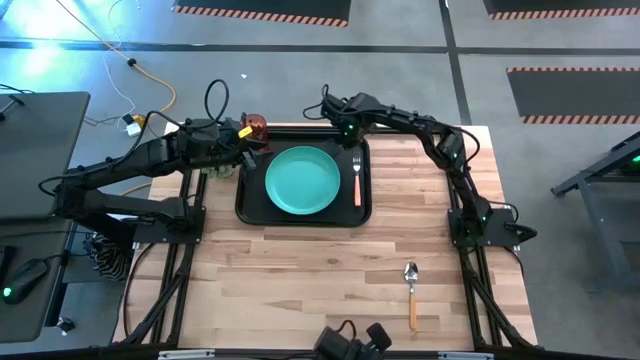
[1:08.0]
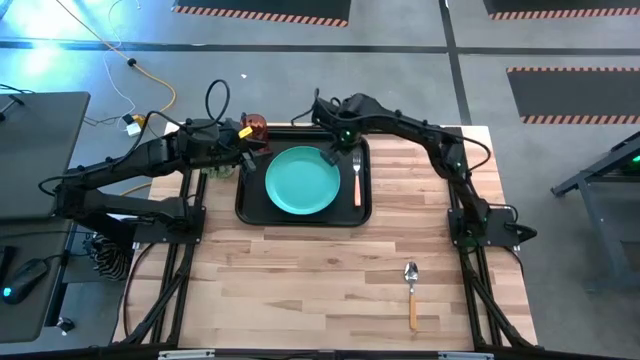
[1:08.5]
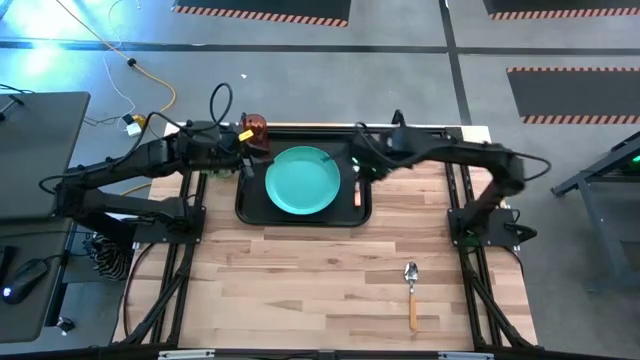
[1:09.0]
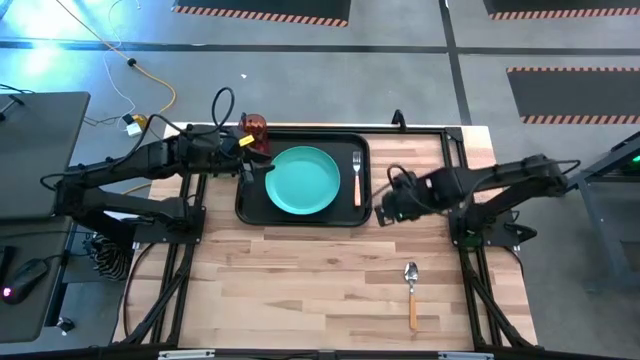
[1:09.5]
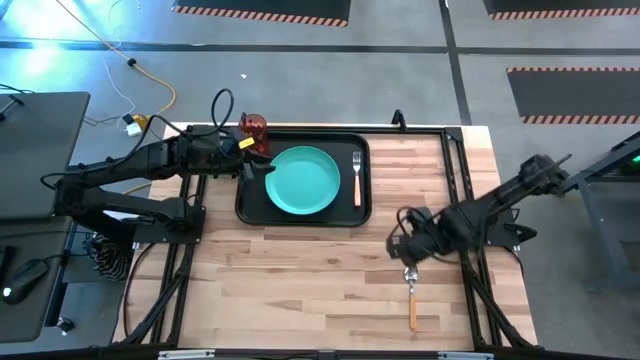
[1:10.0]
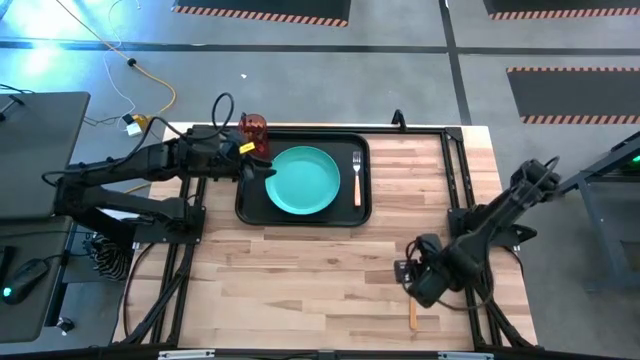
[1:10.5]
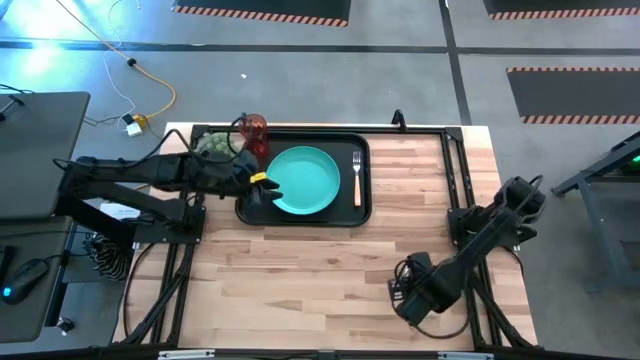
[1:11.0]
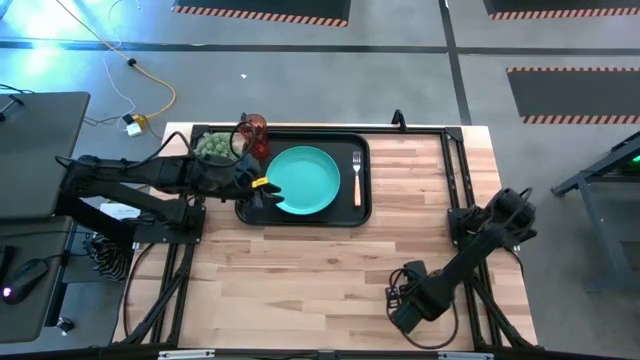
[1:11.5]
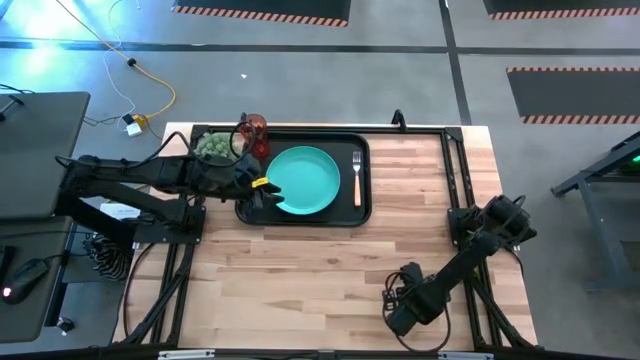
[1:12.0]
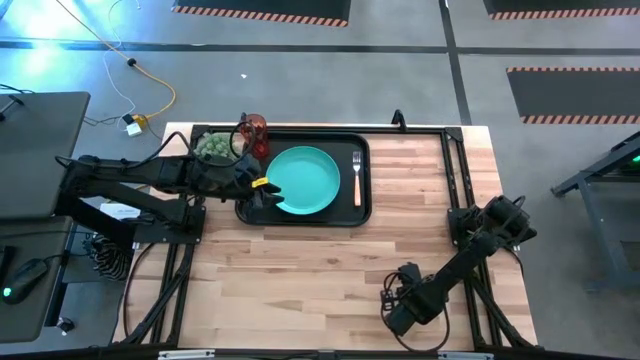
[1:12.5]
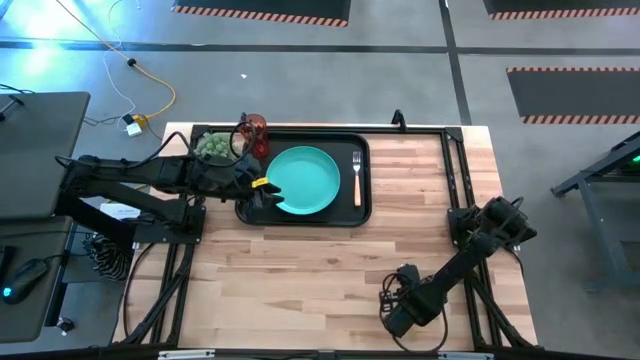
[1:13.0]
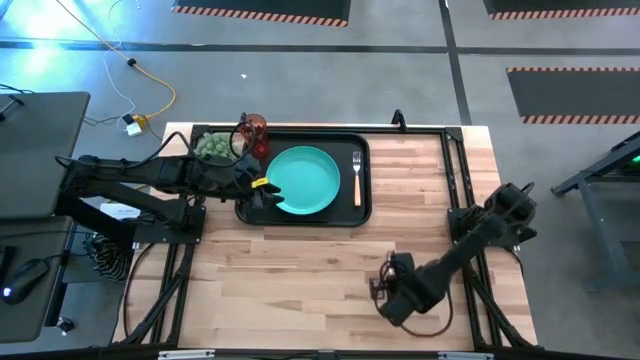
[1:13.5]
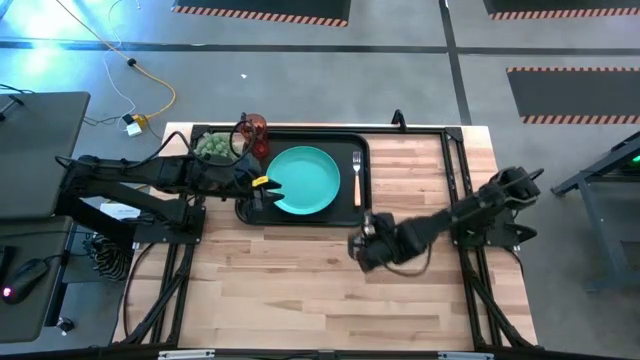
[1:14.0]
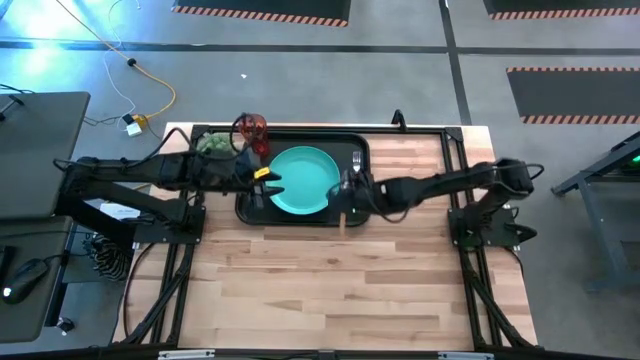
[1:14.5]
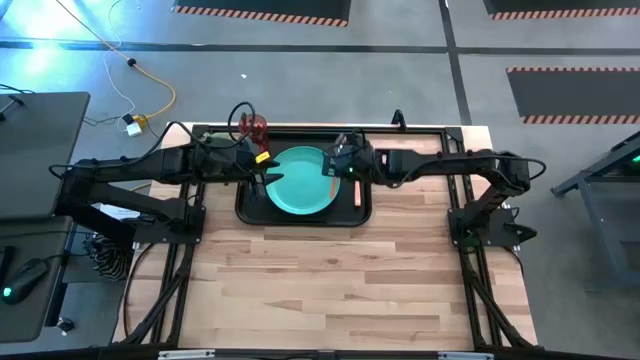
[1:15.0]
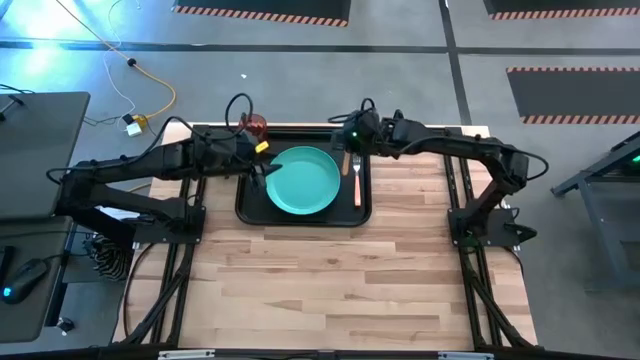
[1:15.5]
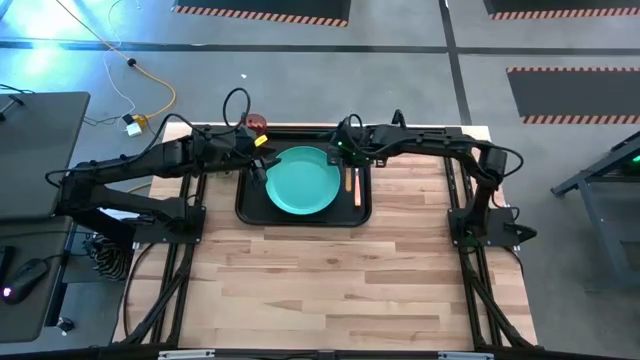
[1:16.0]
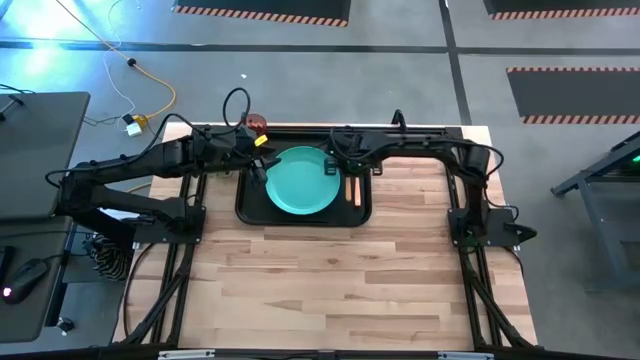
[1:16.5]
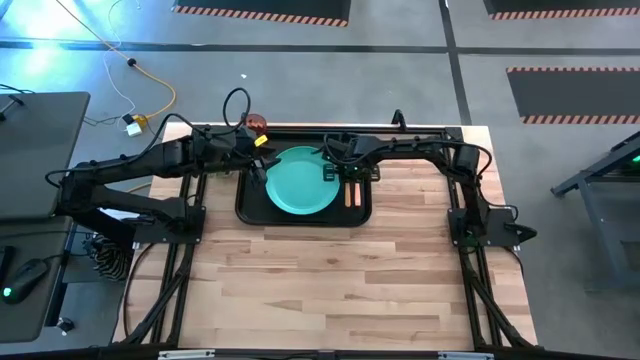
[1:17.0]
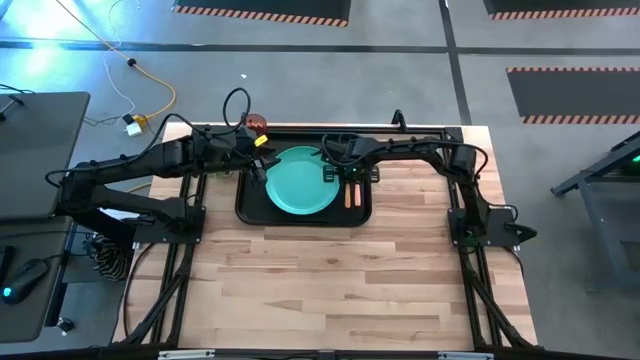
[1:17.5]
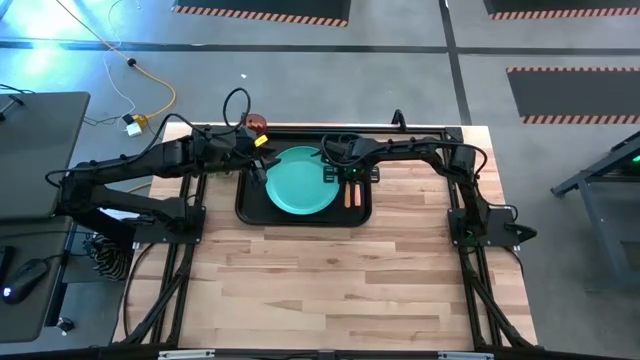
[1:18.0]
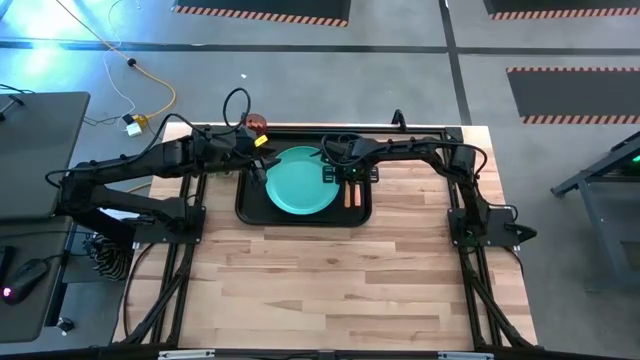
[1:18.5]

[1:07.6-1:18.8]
Task: Pick and place plate/cup/fork/spoon on tray
Put the brown spoon to the right of the blue plate on the black tray

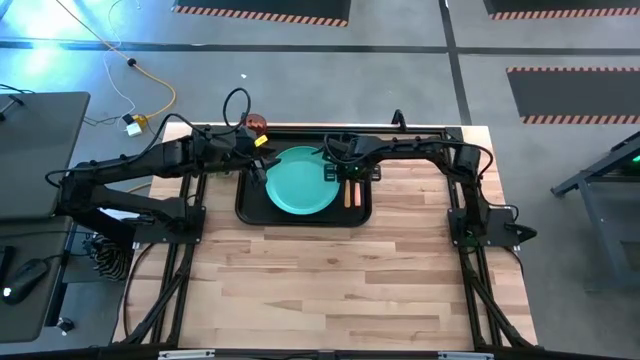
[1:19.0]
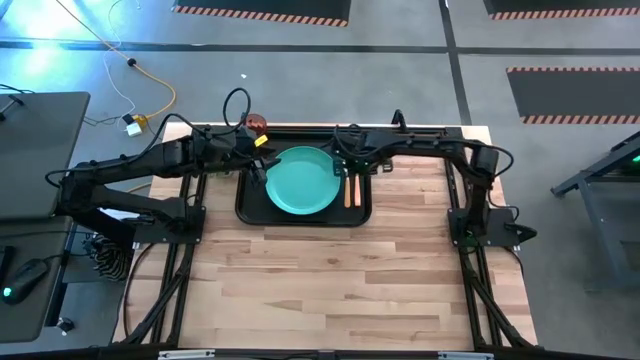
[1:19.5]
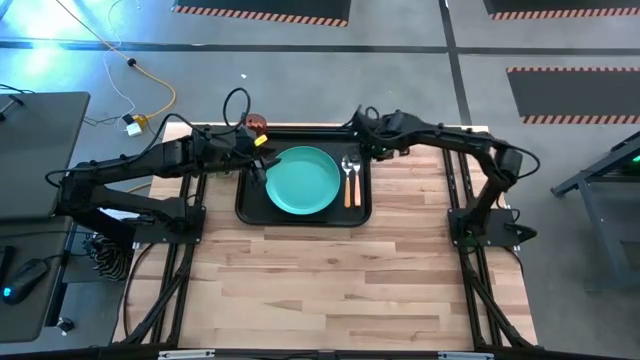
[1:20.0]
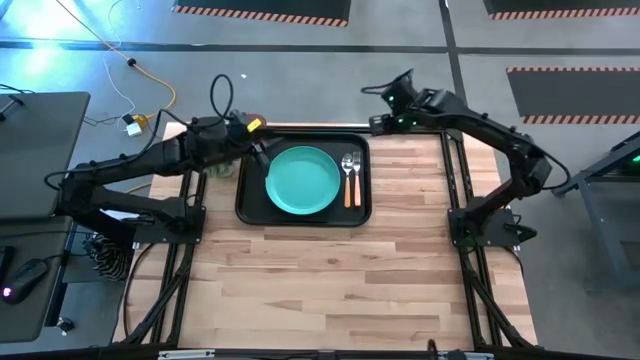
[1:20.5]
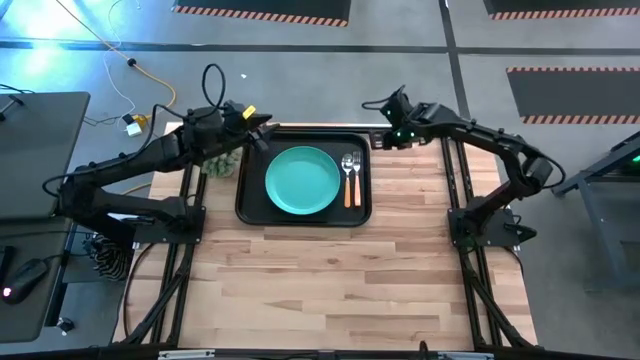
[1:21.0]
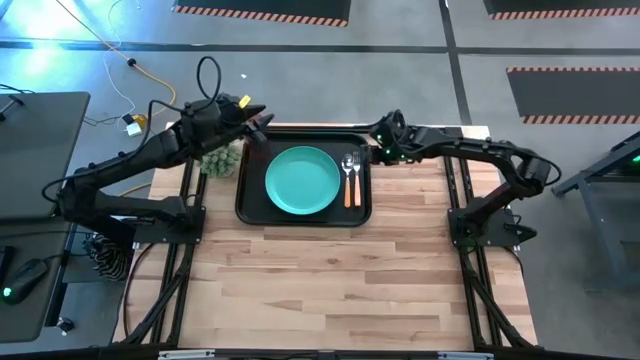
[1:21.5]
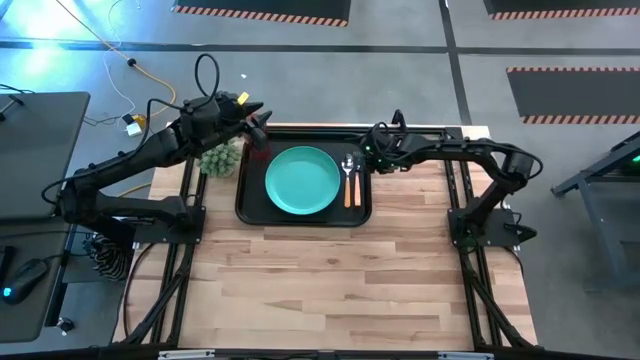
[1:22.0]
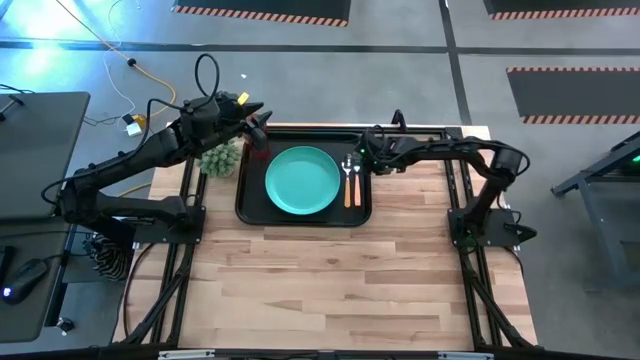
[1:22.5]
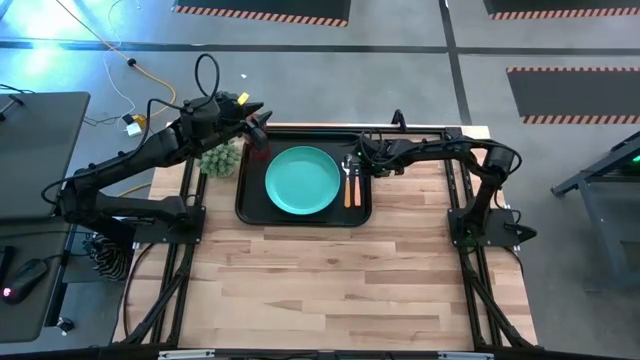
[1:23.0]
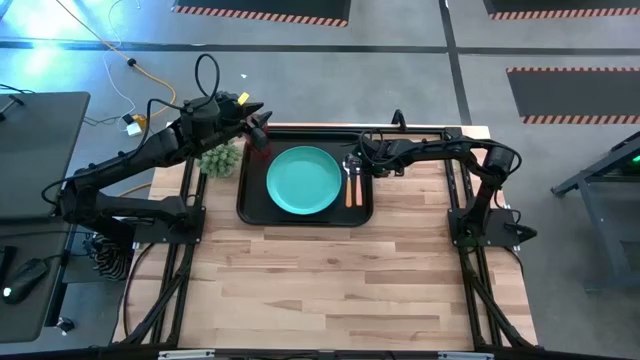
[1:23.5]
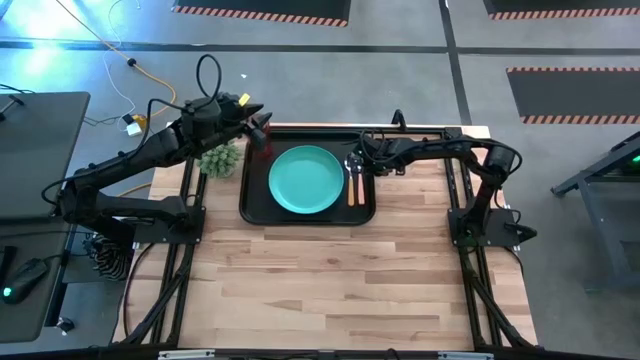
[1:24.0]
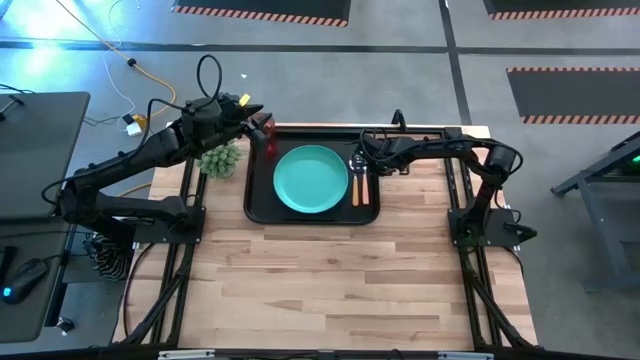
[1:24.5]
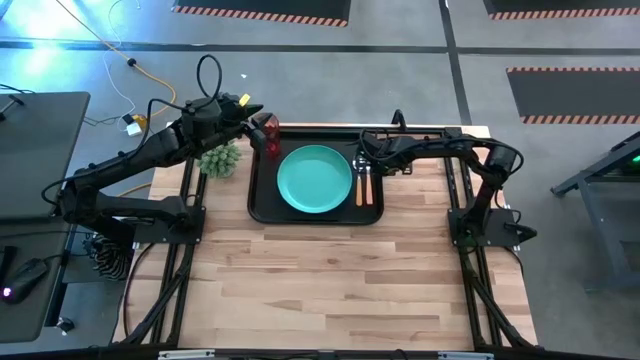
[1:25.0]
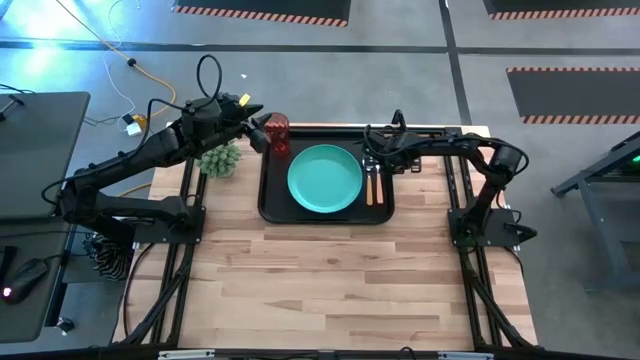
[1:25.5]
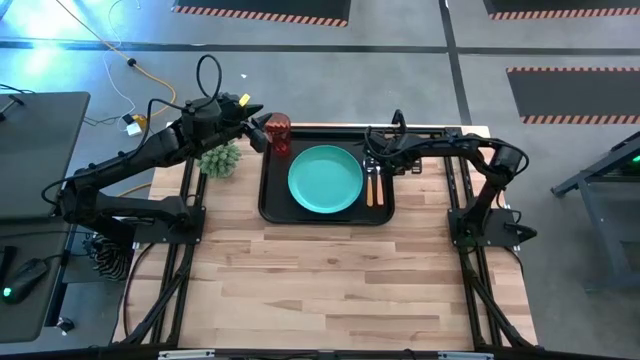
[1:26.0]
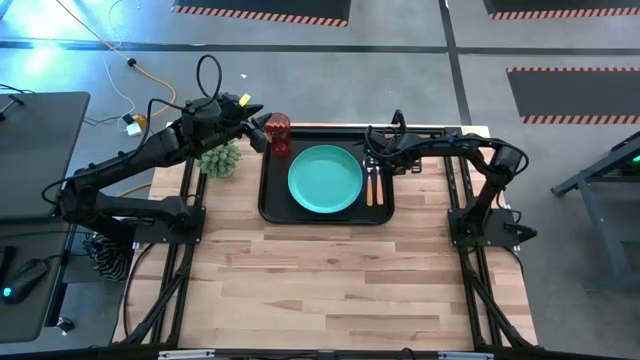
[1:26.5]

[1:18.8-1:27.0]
Adjust the black tray

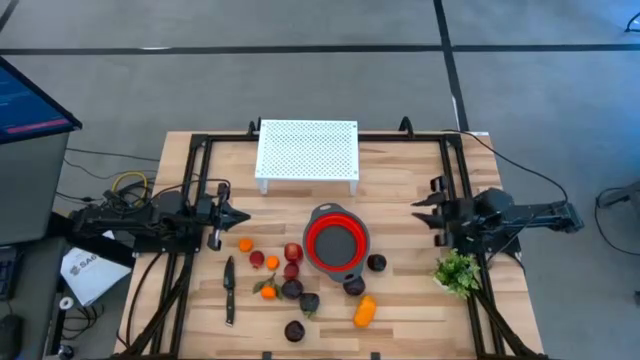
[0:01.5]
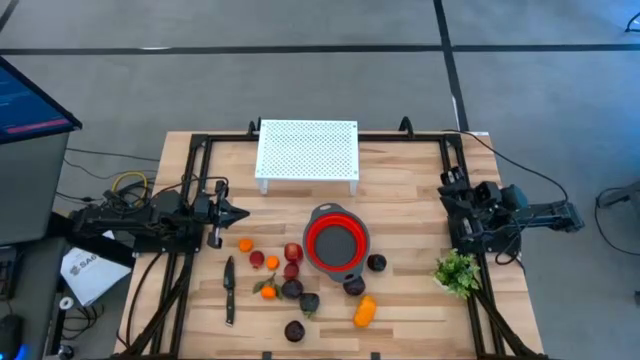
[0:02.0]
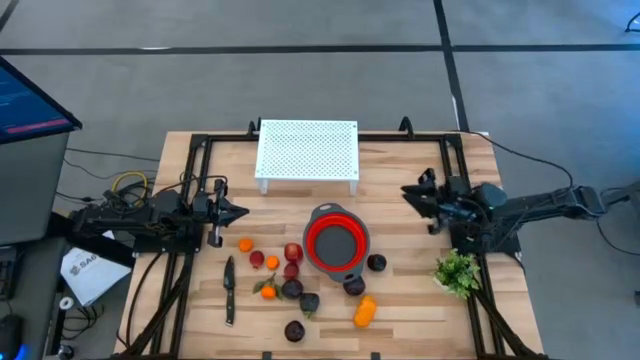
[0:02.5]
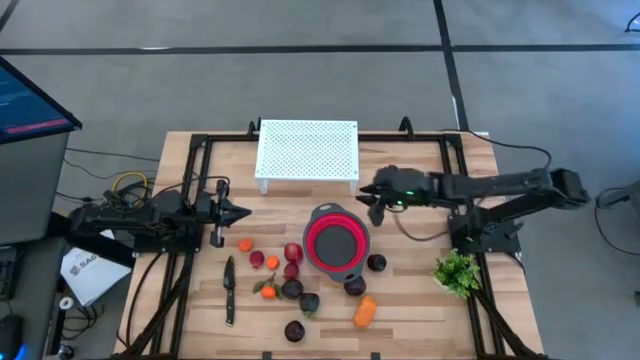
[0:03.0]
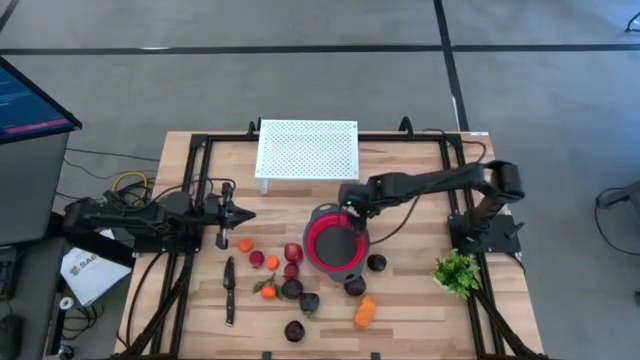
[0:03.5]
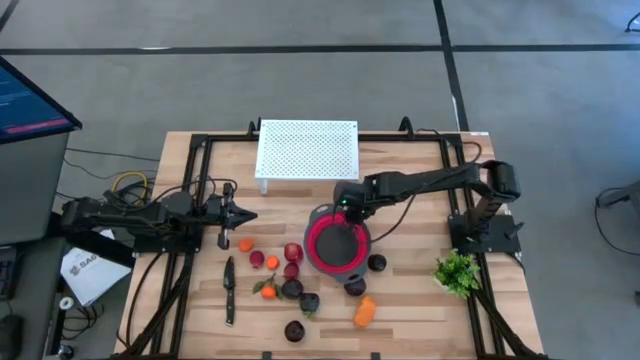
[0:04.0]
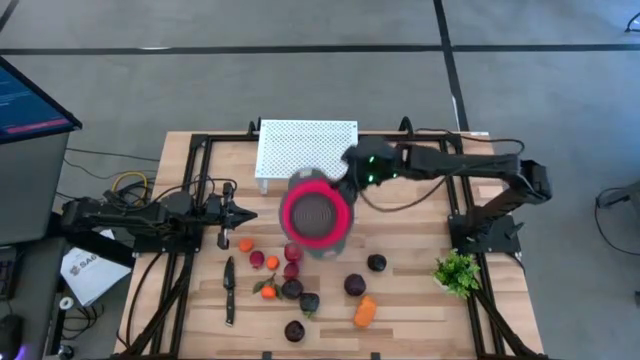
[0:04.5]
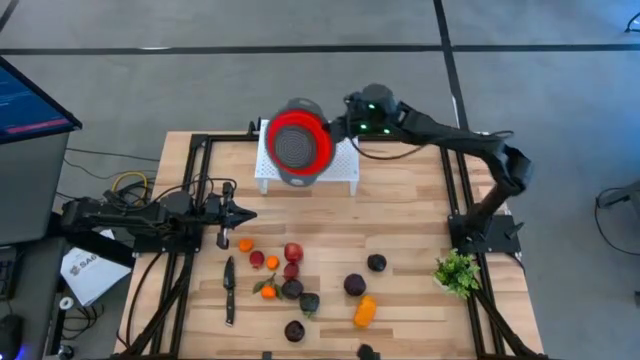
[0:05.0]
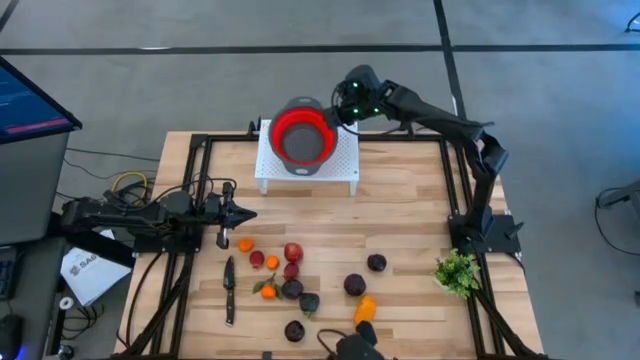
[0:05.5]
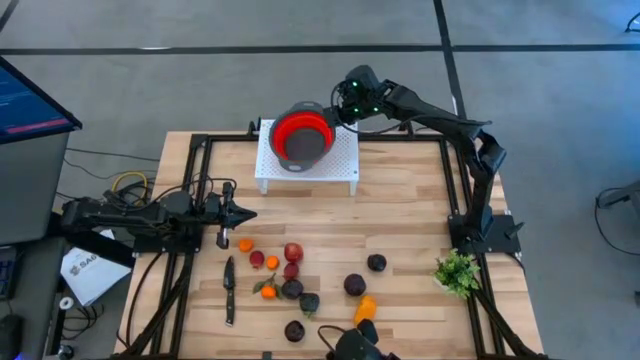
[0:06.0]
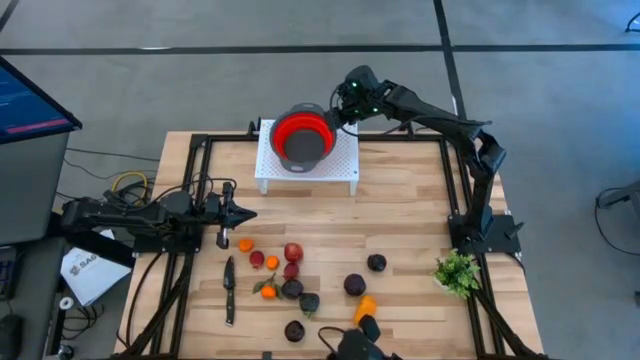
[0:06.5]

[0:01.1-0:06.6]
Task: Pick & Place Fruit
Put the red strainer bowl on the shelf
